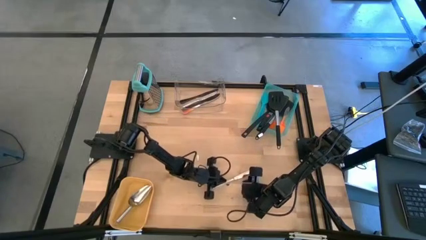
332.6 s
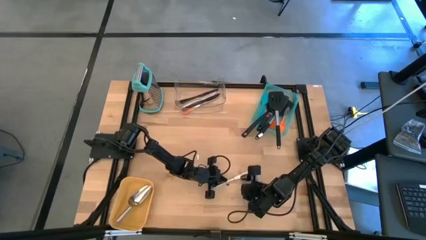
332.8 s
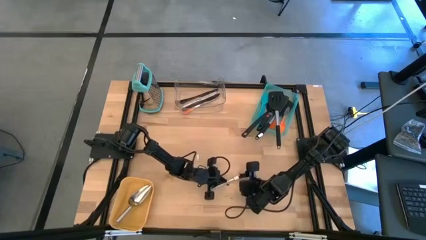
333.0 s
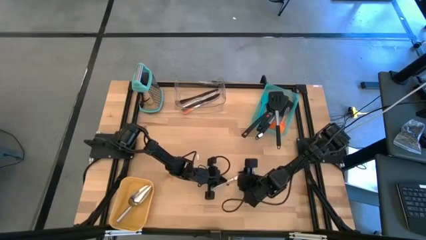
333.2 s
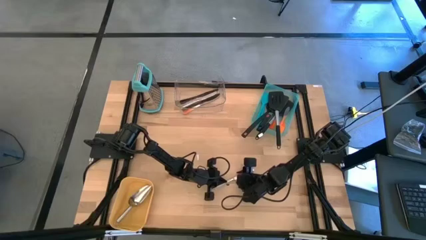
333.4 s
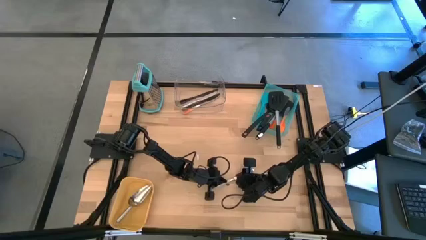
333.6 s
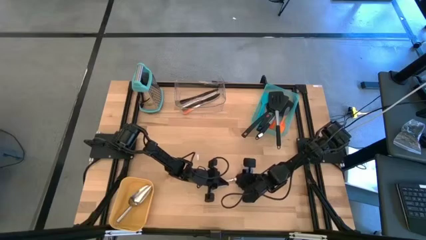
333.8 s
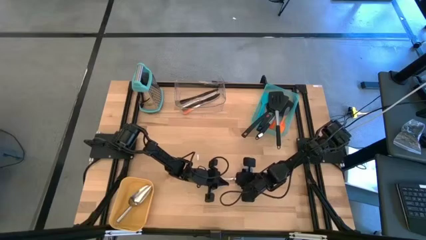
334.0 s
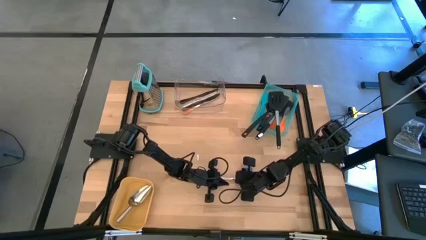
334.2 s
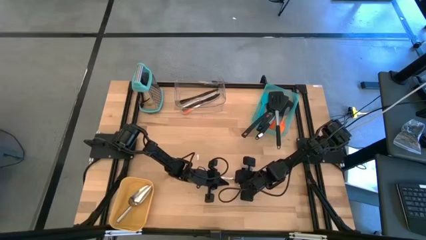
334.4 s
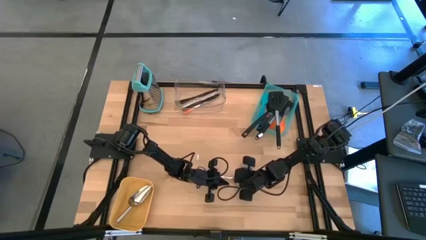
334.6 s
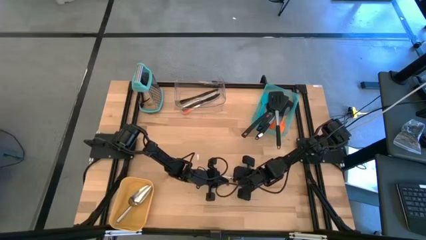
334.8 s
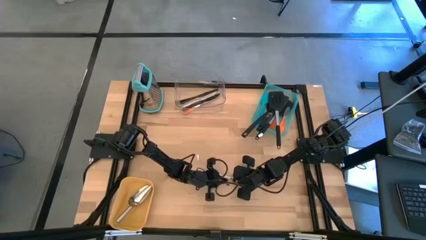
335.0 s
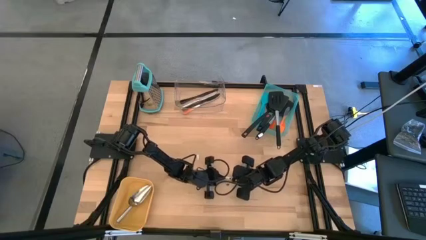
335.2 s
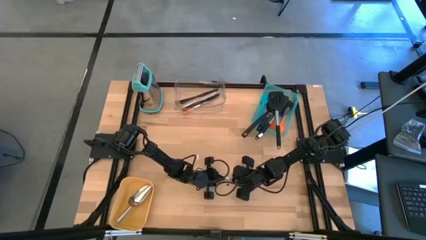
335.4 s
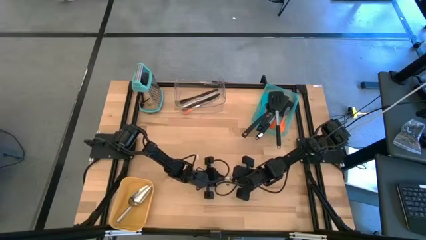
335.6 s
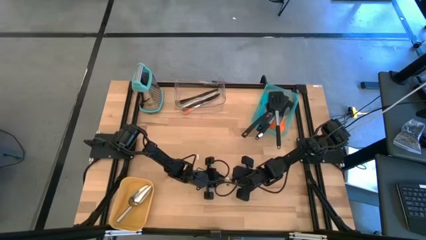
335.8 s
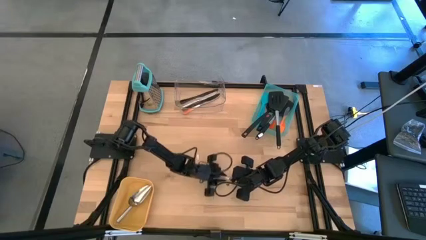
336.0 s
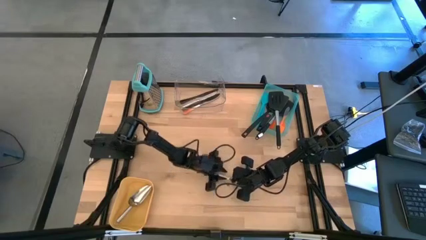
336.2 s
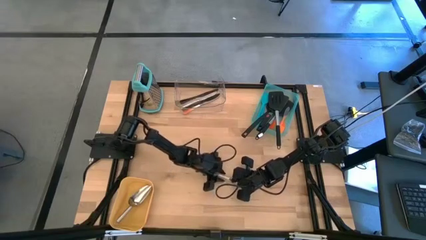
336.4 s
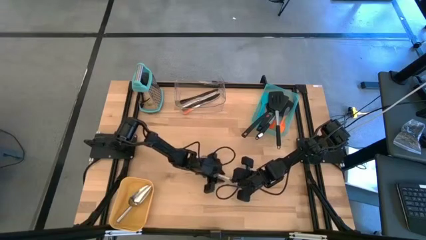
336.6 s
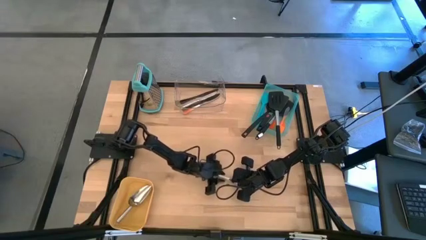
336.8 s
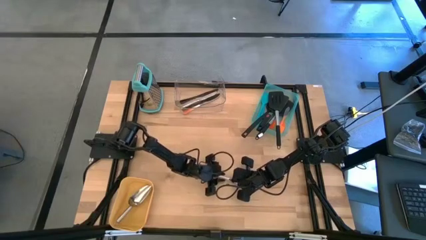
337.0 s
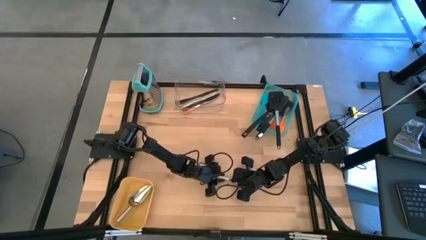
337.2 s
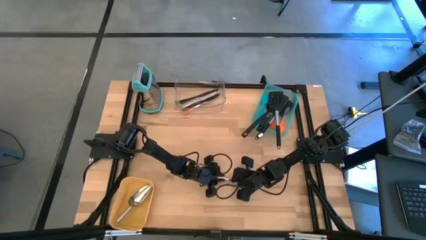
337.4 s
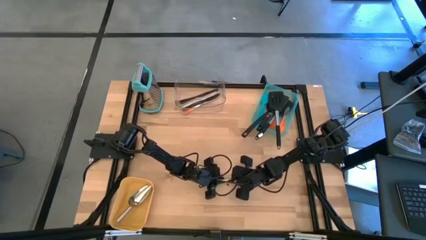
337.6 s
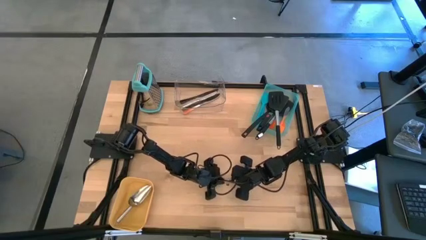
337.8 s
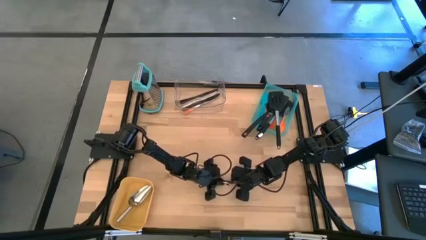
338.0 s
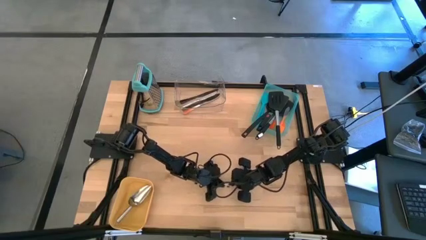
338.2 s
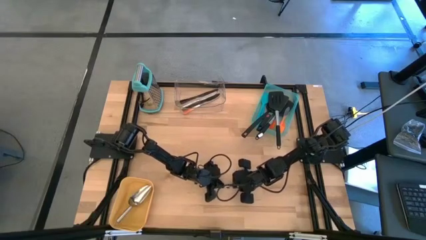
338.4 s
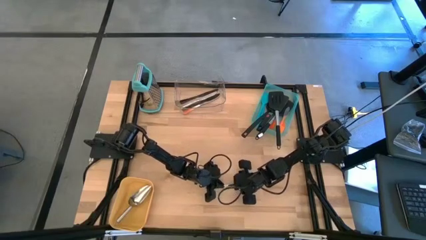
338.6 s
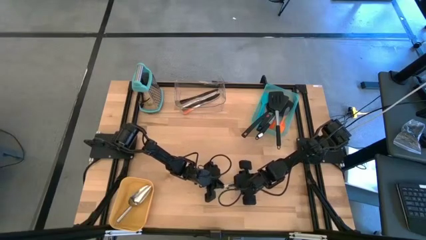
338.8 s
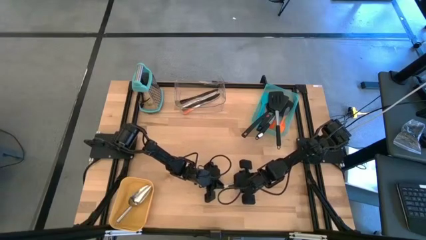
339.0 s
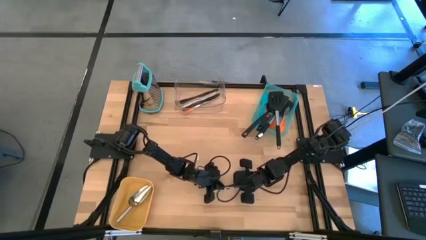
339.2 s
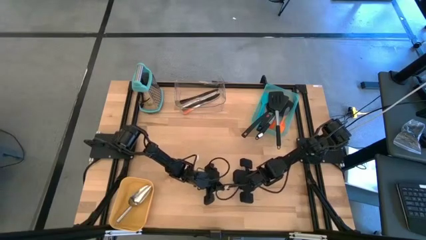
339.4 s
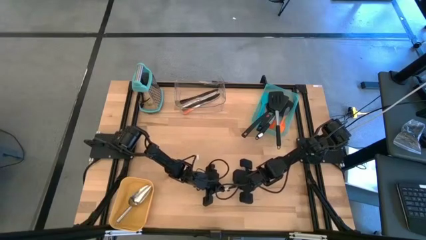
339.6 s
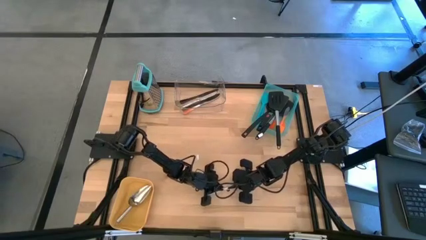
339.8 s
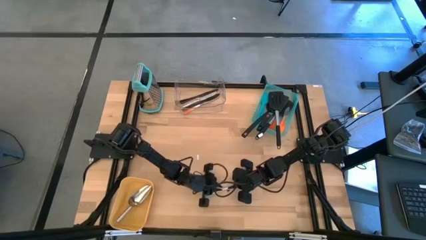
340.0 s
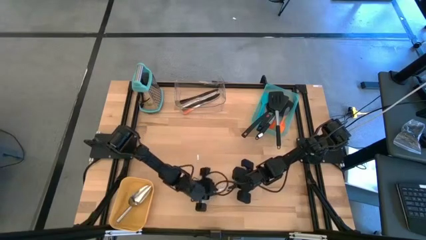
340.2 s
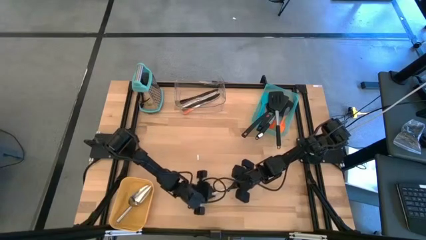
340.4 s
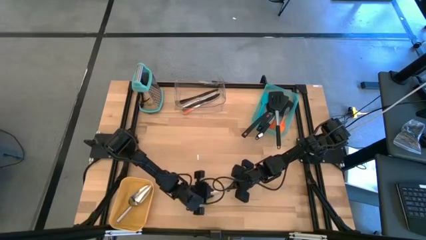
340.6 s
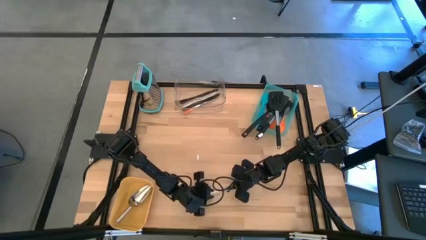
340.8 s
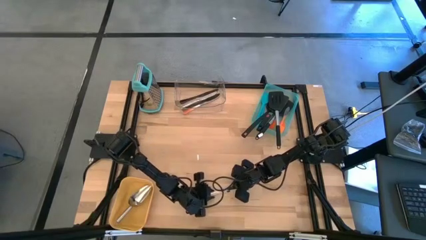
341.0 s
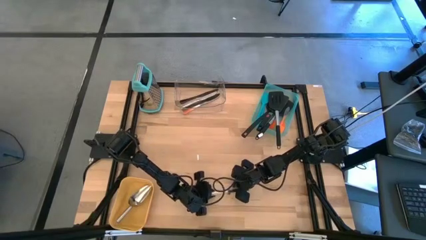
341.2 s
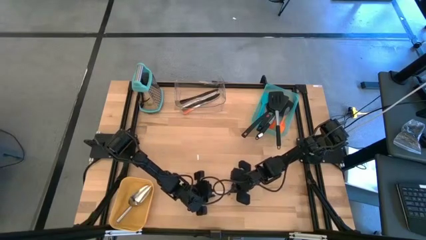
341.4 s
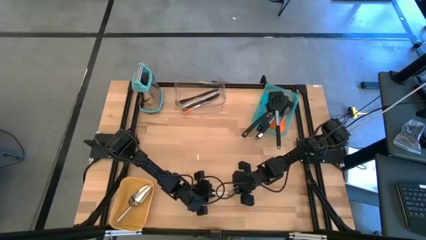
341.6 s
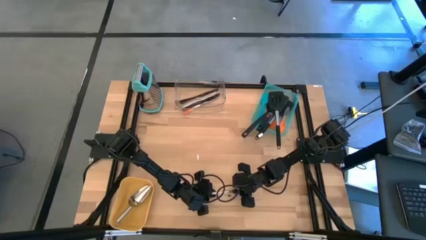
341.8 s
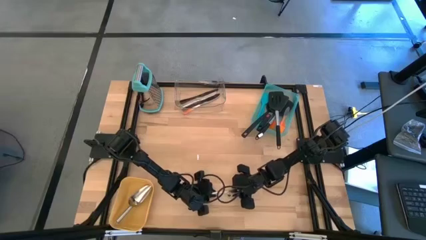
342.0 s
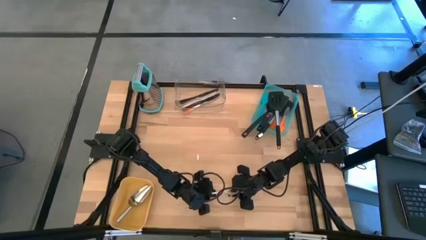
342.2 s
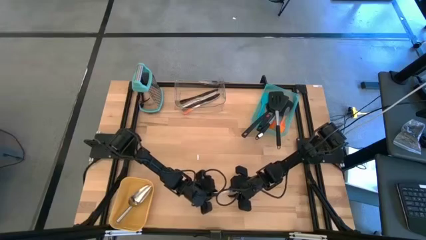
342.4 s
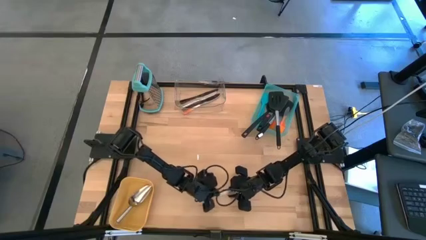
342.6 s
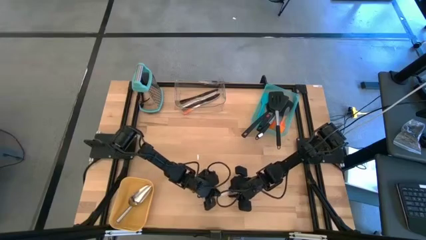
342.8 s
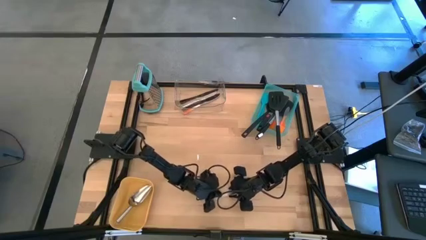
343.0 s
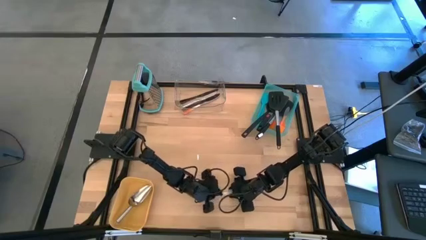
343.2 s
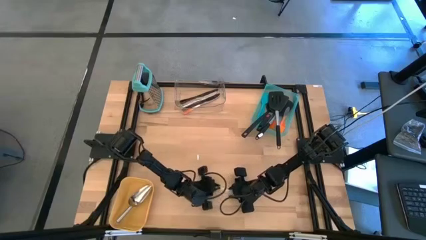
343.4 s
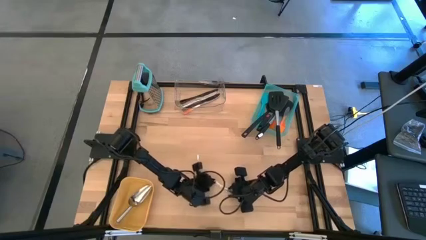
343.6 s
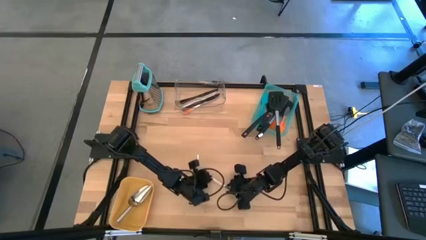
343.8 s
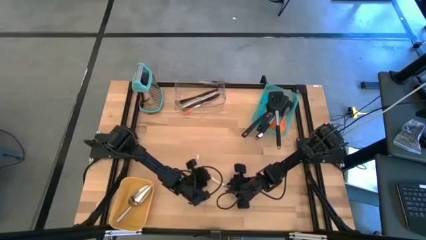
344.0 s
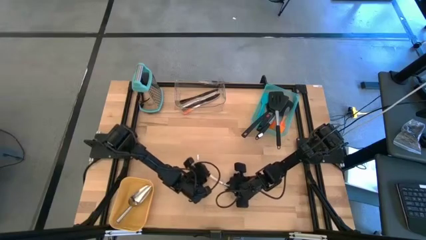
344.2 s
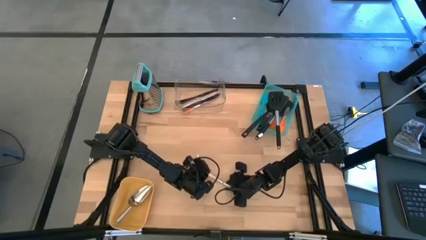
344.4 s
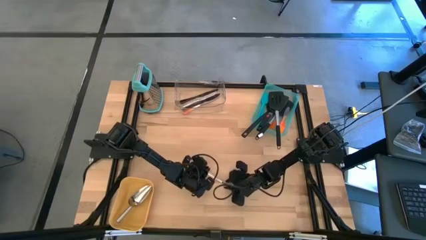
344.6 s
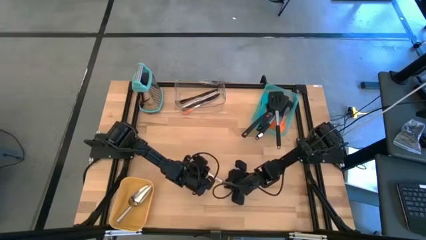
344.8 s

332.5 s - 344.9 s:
Task: Pick & Place Kitchen Items
Put the silver table knife into the transparent bin

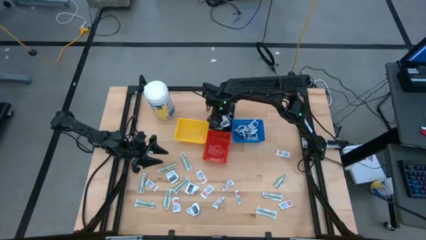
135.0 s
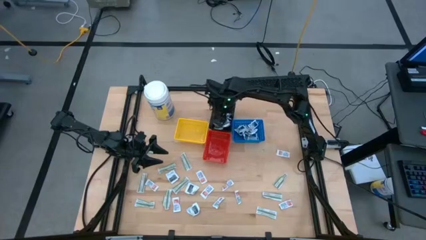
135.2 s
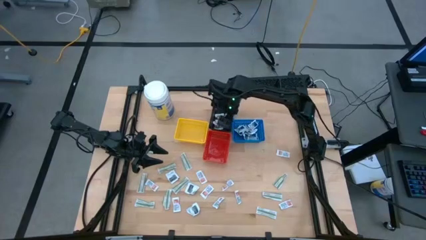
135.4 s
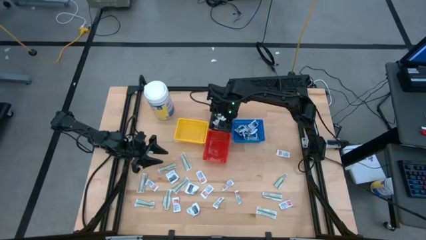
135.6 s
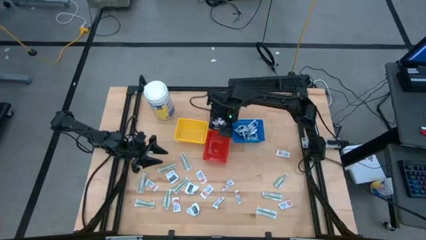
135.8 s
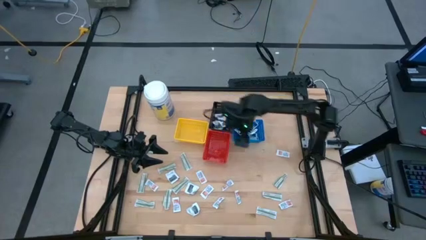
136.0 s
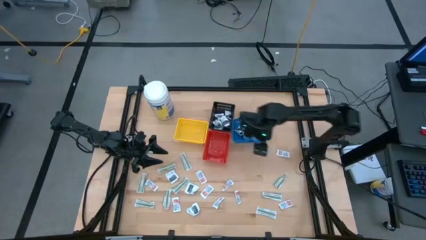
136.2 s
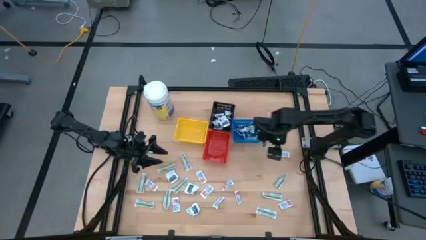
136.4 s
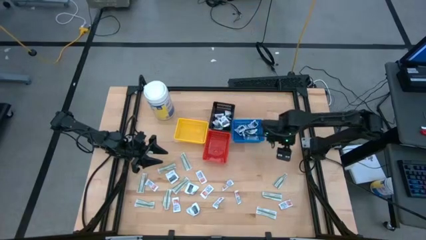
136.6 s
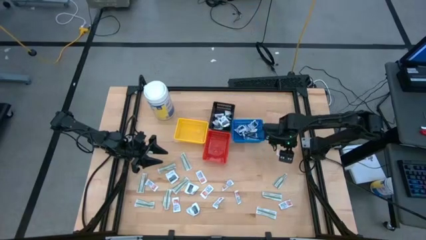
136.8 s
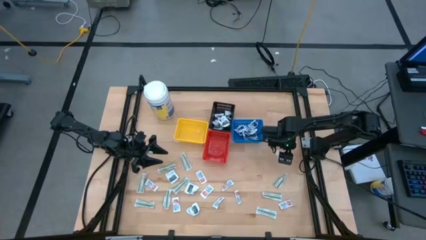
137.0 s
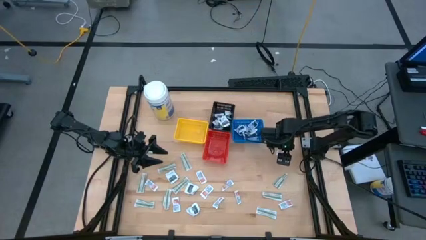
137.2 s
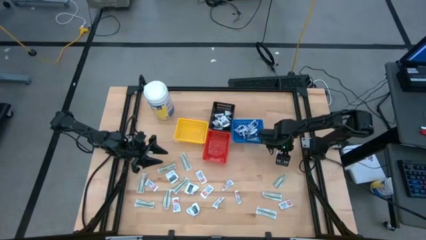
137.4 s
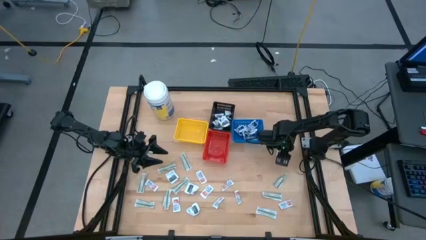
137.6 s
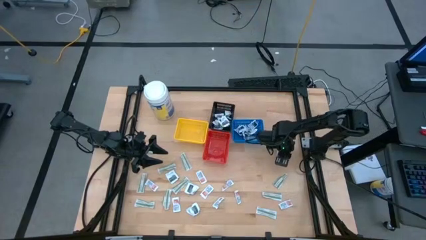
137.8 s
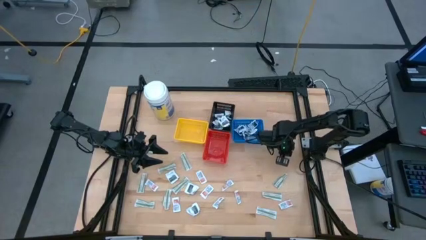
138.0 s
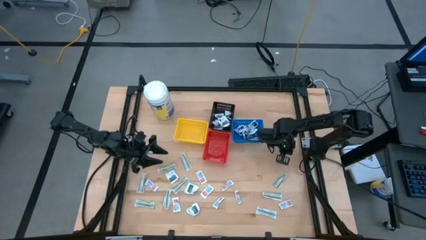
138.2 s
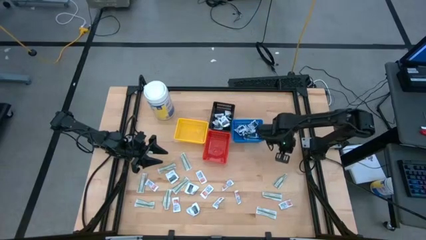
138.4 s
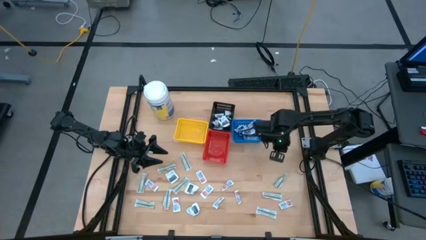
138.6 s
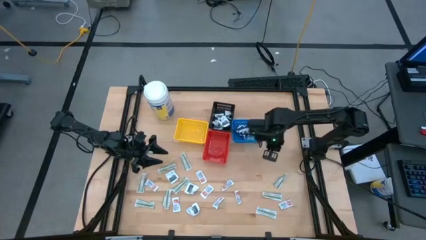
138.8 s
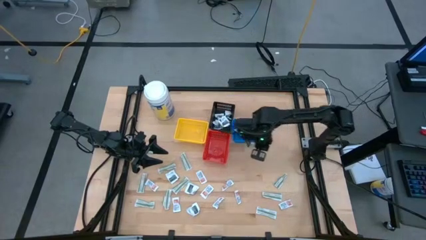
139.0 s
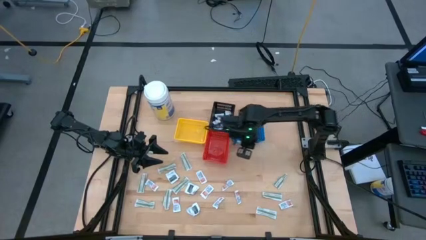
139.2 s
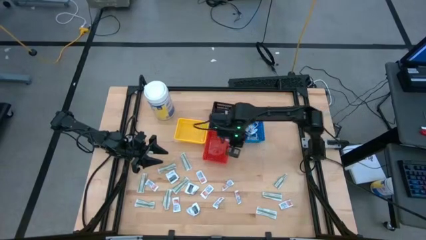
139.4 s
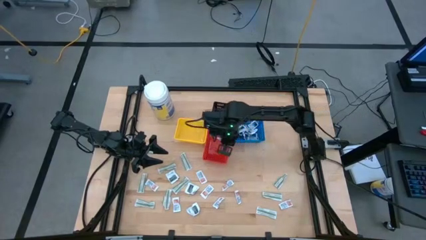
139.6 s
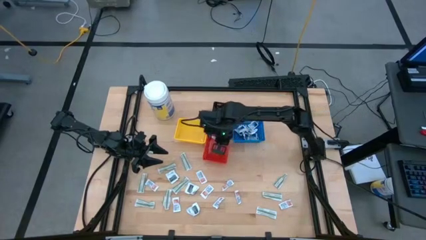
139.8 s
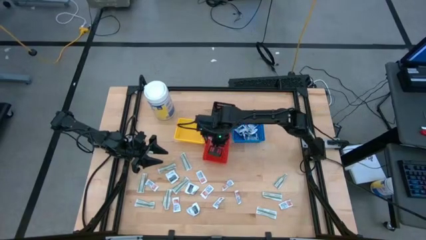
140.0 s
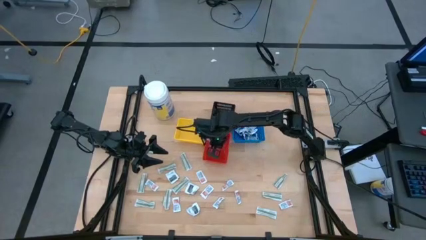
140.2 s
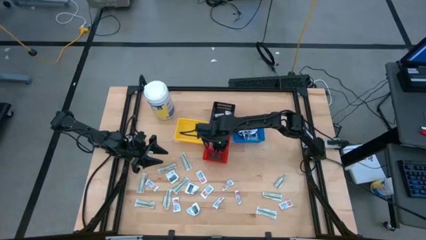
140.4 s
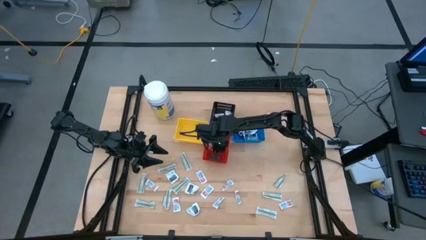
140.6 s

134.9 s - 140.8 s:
Task: Pick & Place First Aid Supplies
Put the ointment pack into the red bin
